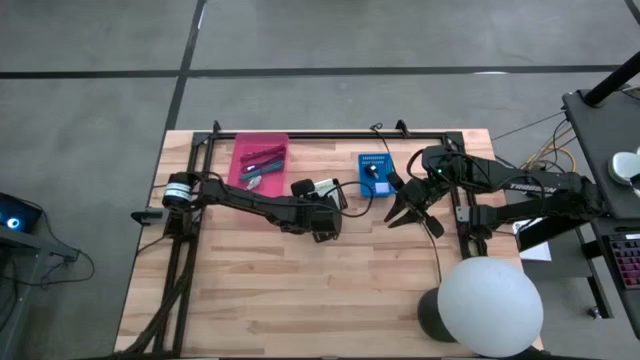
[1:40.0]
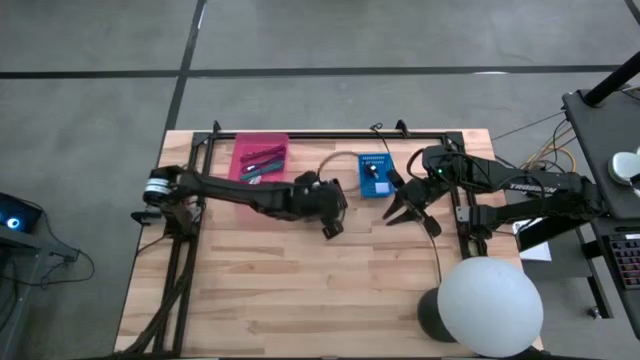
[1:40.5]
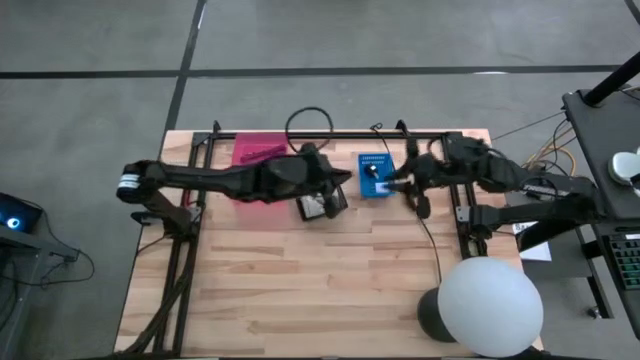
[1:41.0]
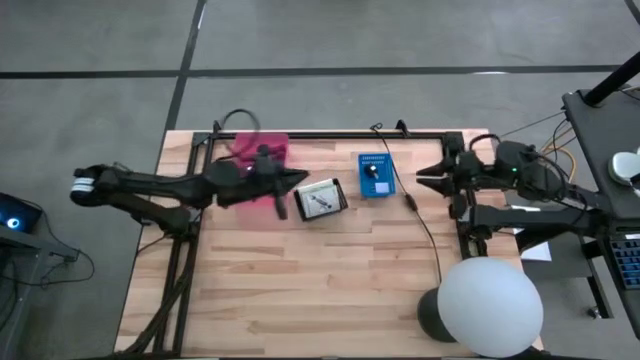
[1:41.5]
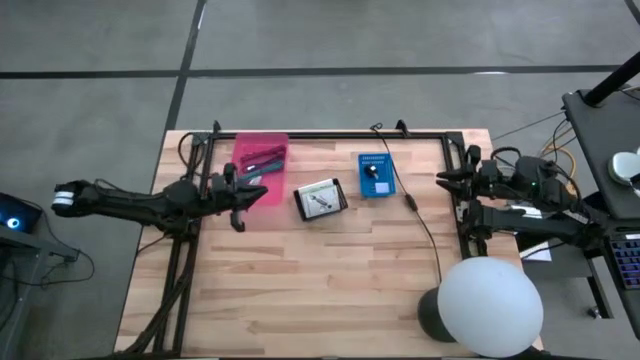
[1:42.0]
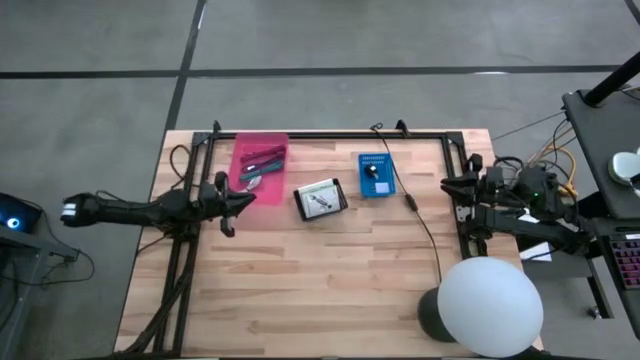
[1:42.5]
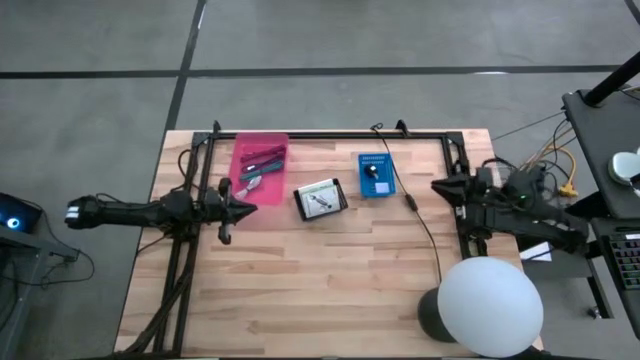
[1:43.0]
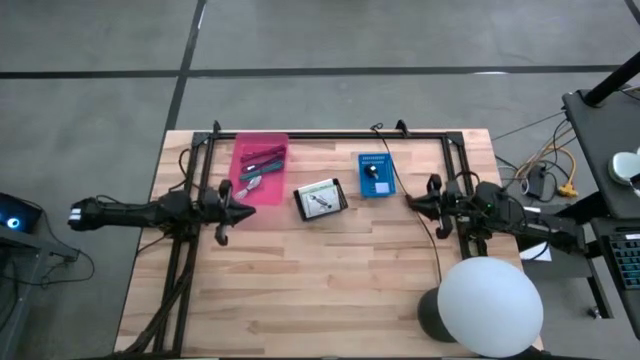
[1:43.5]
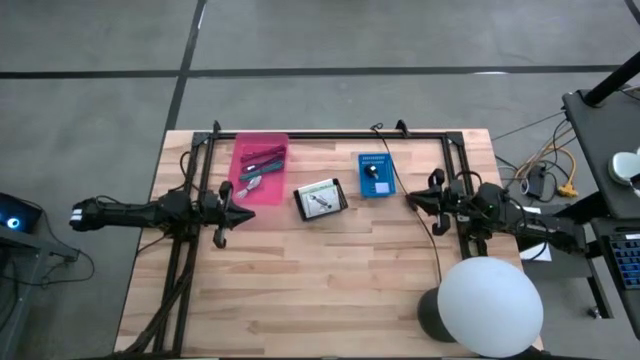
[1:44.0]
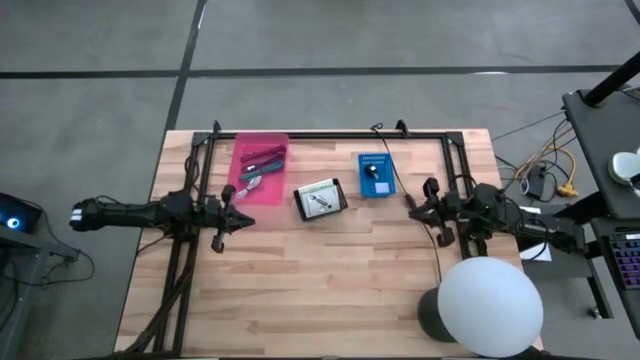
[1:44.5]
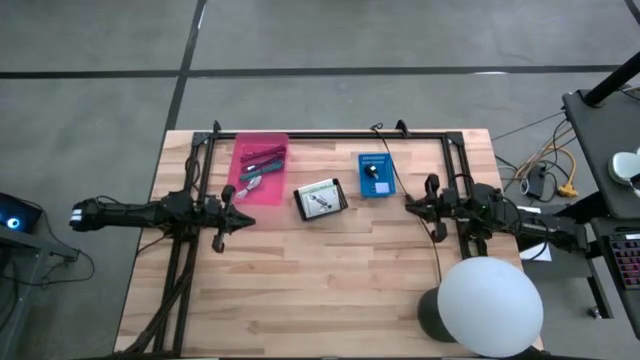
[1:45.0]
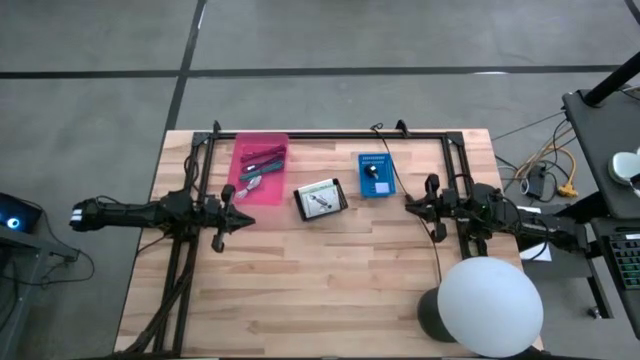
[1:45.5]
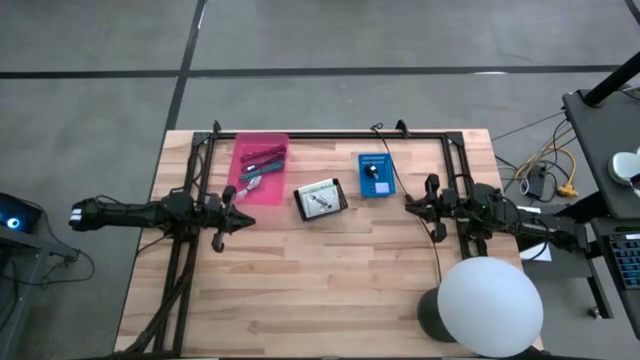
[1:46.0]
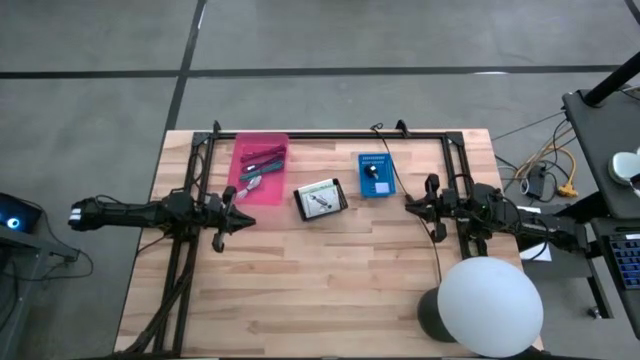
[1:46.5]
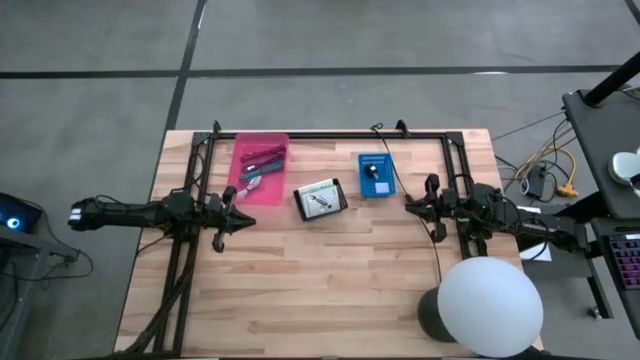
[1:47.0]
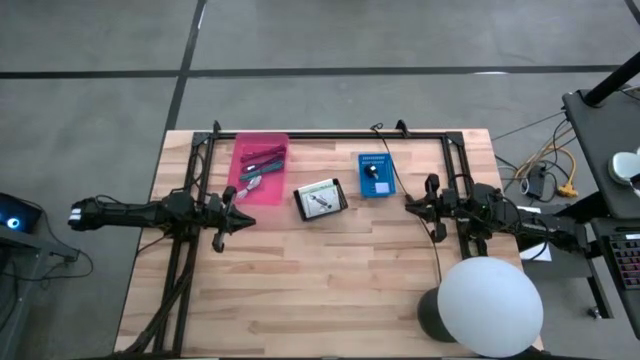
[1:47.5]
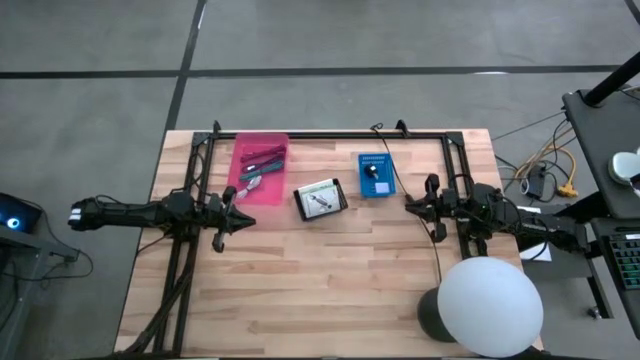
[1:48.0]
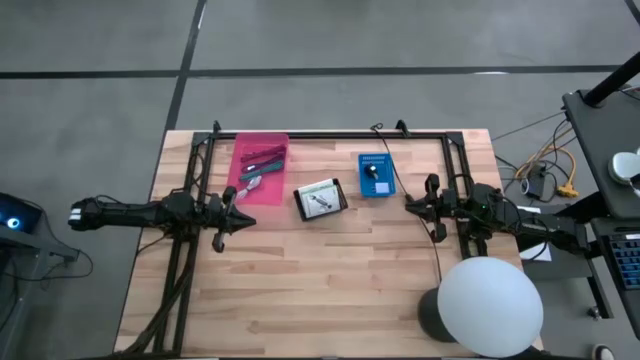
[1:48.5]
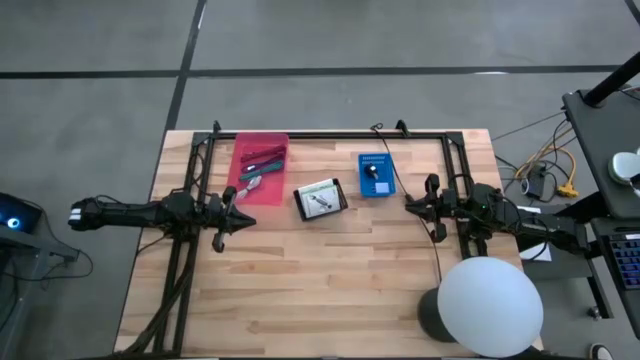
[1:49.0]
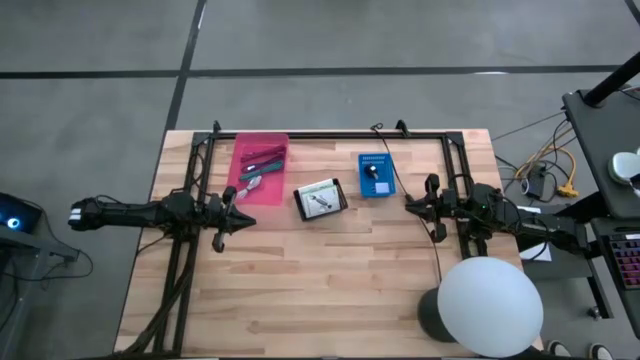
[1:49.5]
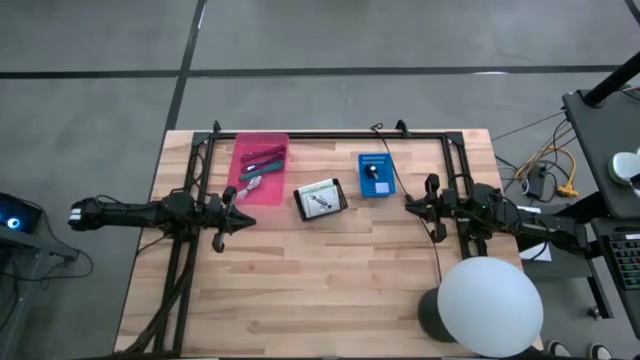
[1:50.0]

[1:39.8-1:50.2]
Task: Pick and place items into bin
Return to Home Position
